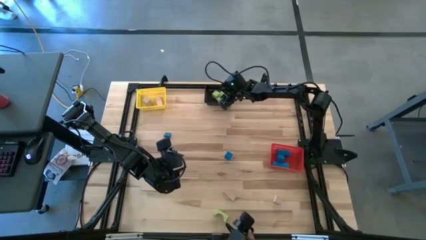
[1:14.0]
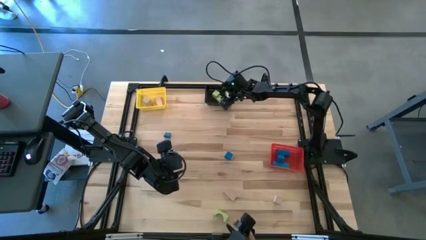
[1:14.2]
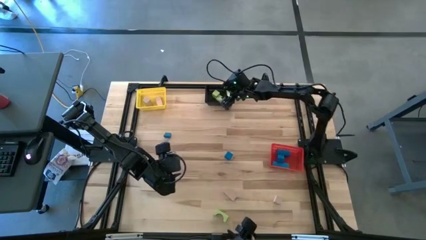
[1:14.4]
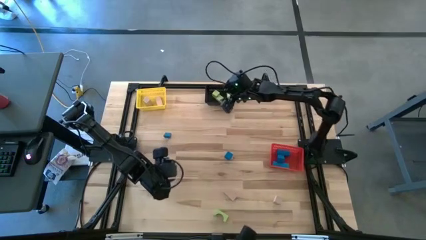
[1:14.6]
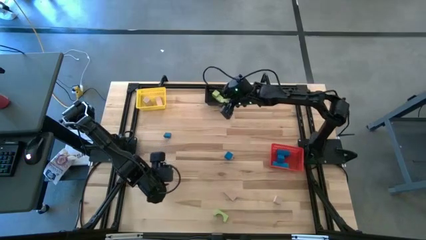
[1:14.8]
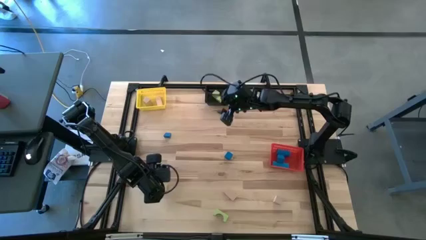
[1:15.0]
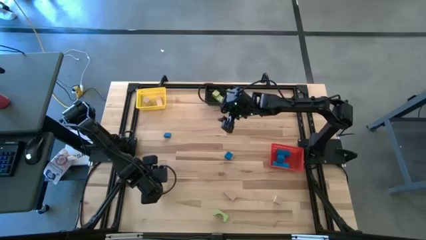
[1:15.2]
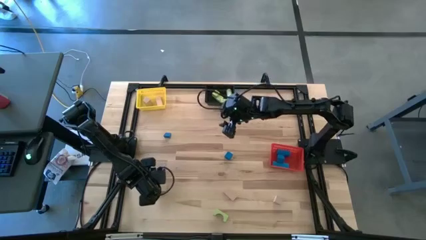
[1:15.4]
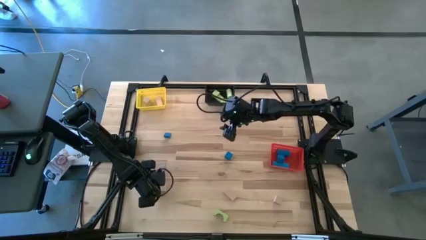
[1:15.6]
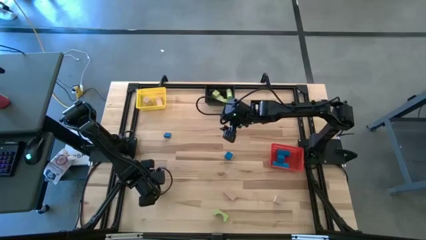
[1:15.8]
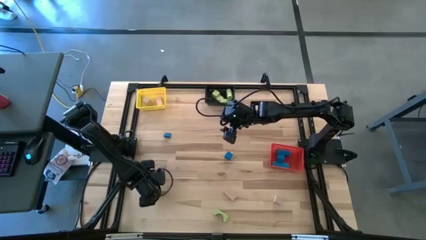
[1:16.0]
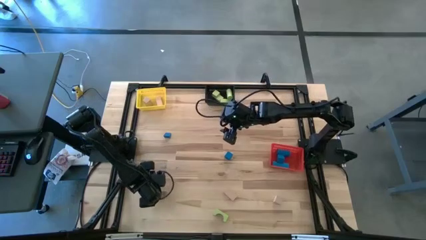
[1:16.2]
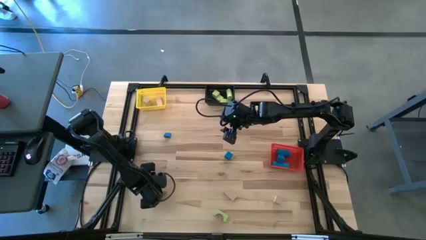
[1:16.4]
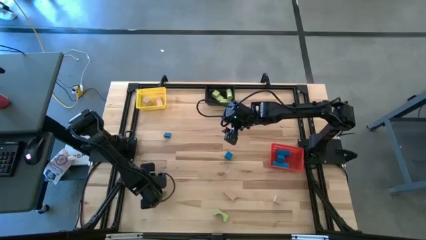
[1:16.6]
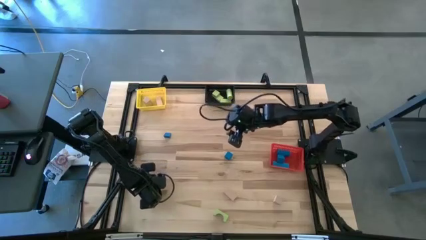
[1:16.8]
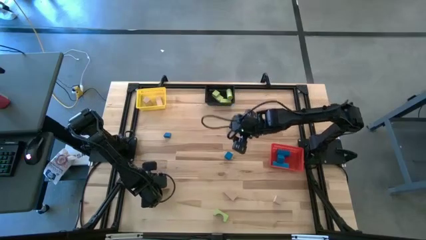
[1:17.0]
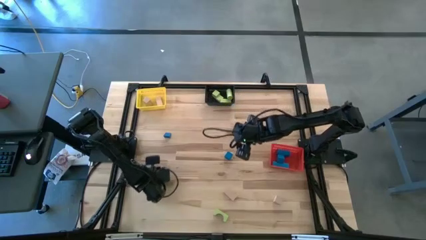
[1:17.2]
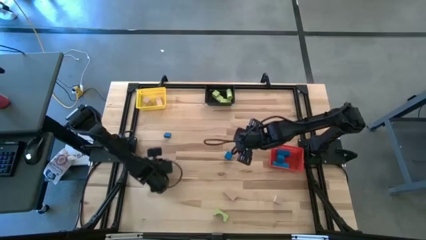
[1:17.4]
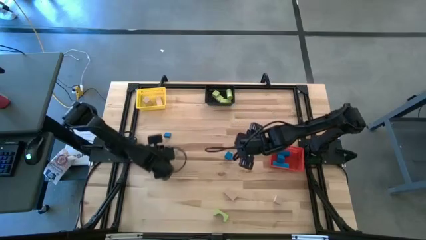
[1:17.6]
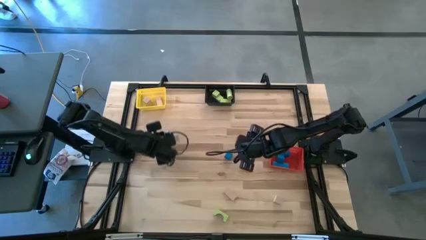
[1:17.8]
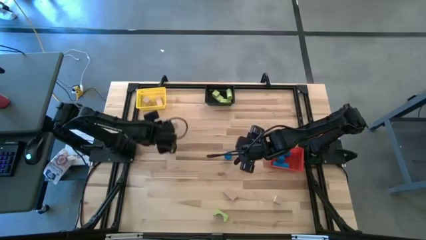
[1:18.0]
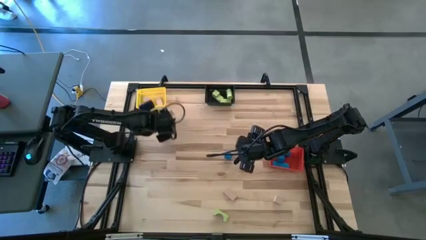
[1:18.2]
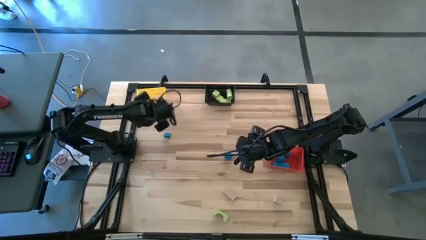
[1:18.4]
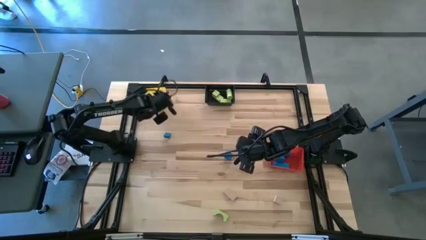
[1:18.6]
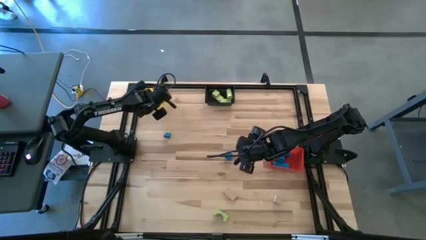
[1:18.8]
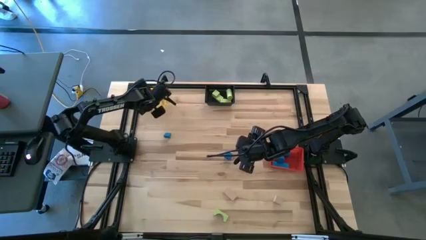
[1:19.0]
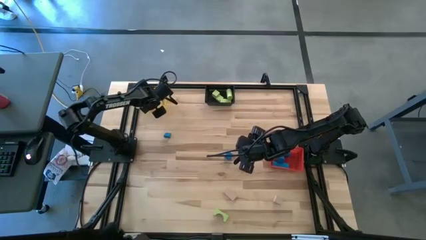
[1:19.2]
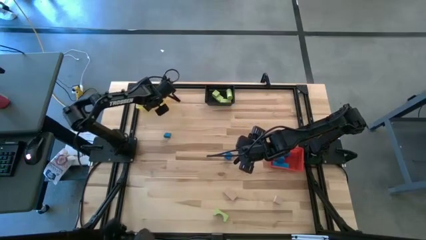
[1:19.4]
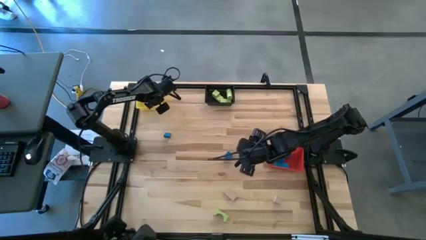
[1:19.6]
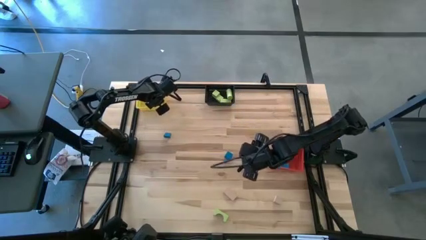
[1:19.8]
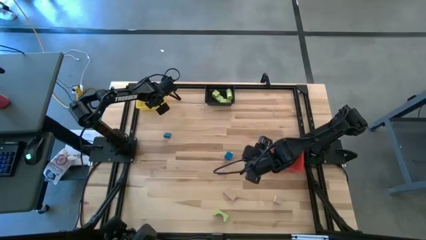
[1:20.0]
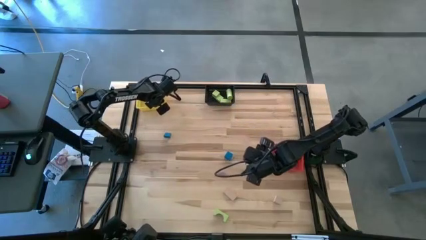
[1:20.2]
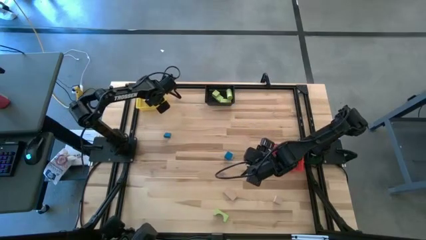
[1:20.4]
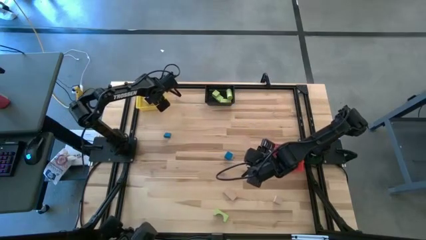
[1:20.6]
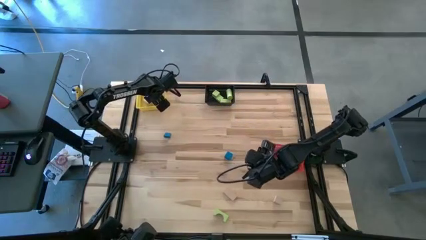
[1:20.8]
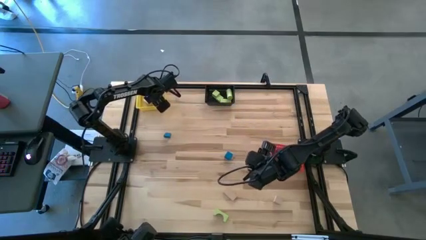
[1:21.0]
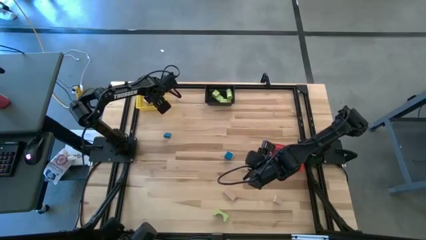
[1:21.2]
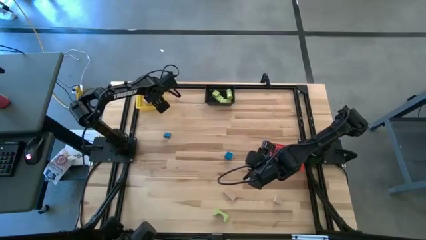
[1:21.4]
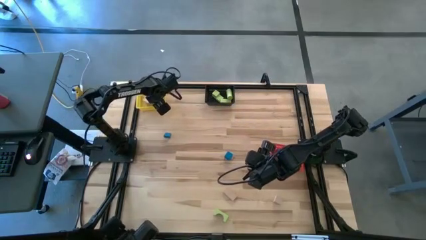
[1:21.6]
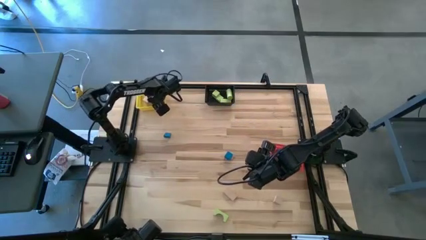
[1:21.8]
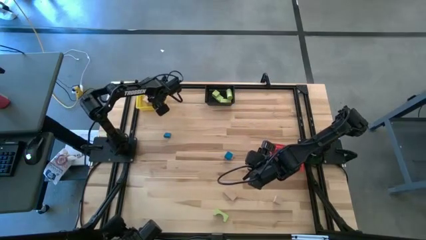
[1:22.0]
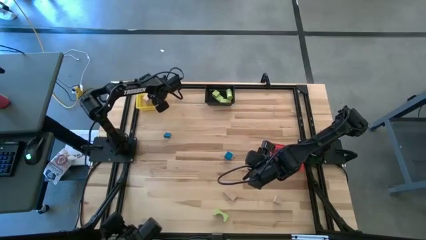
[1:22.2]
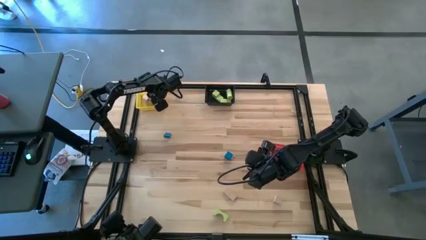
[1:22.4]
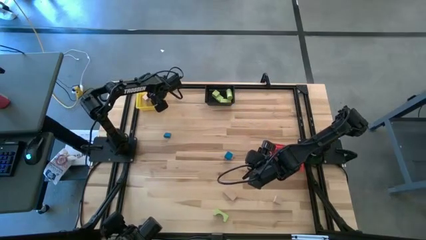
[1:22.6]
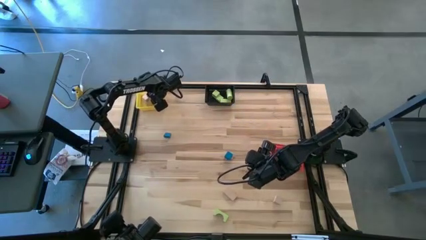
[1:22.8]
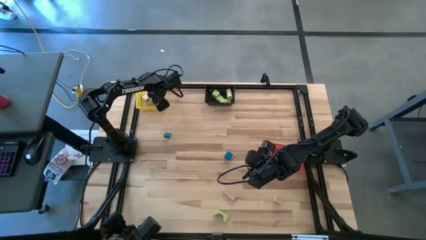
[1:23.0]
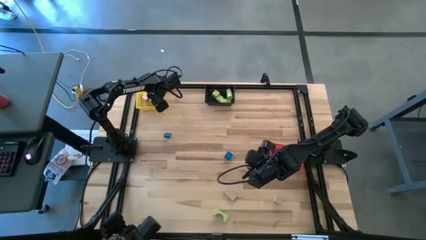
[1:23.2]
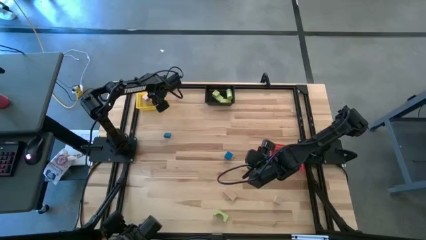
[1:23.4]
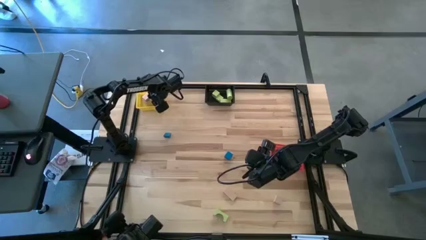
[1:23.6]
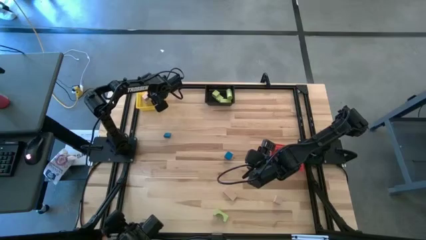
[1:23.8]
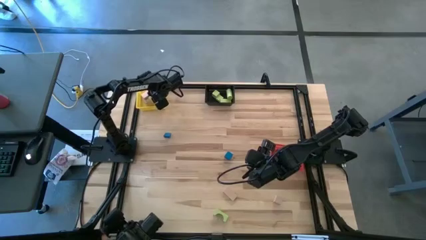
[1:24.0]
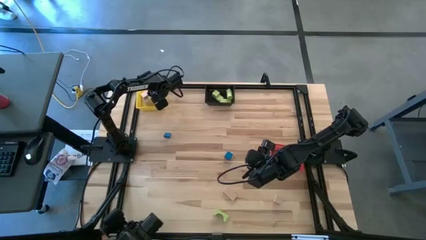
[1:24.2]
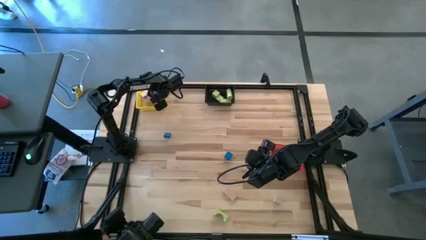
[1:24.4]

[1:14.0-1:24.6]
Task: Sort & place blocks by color
Put the brown block into the yellow basket

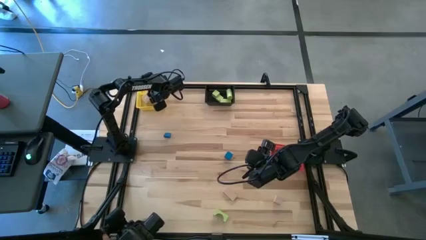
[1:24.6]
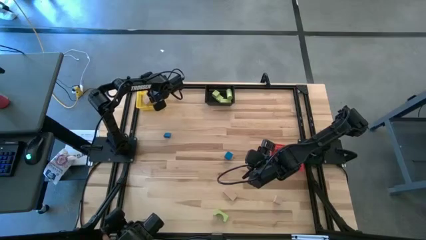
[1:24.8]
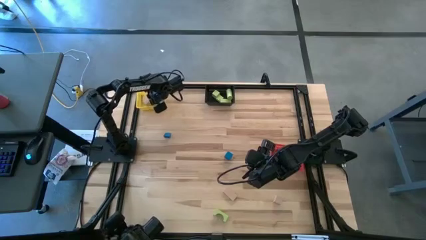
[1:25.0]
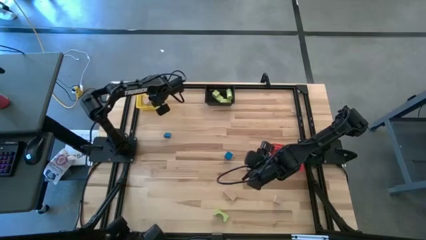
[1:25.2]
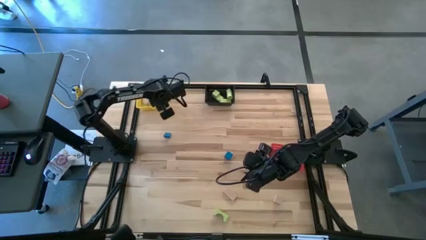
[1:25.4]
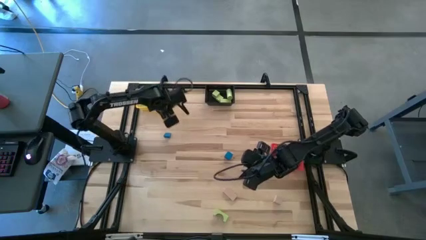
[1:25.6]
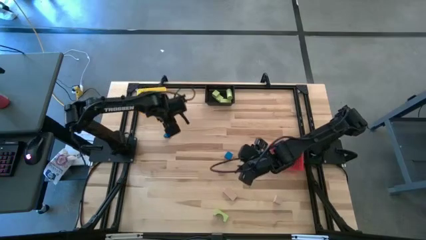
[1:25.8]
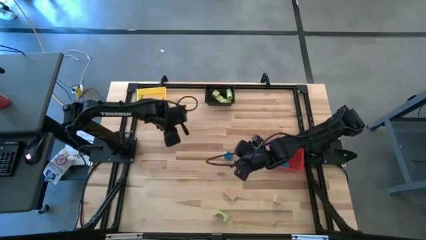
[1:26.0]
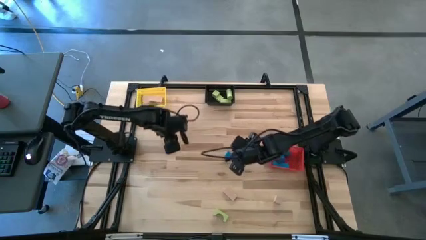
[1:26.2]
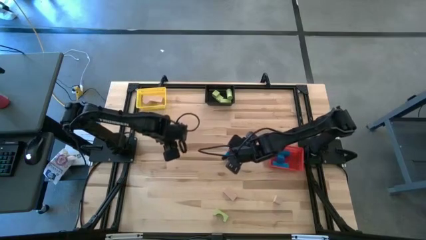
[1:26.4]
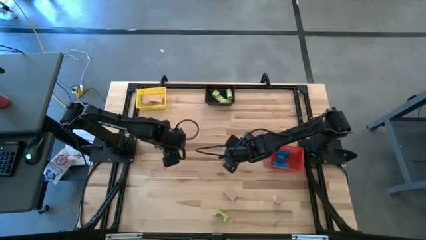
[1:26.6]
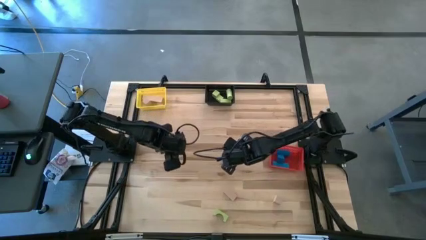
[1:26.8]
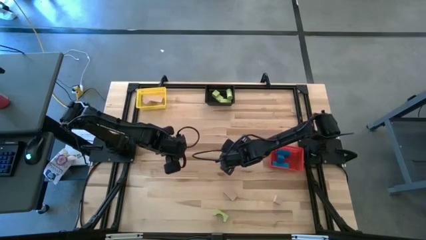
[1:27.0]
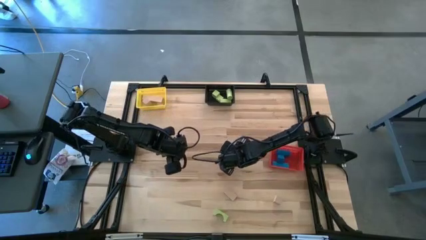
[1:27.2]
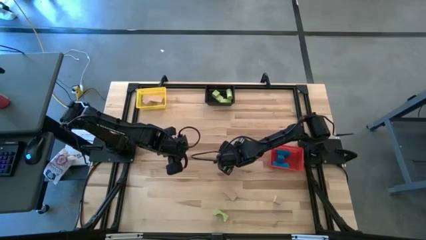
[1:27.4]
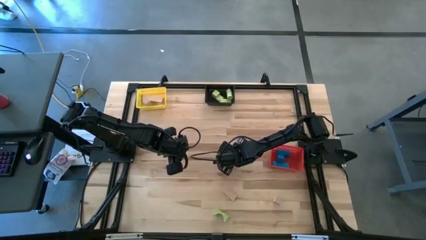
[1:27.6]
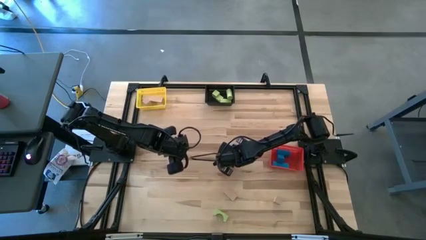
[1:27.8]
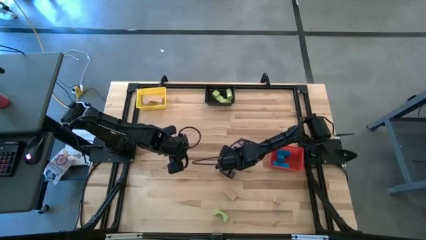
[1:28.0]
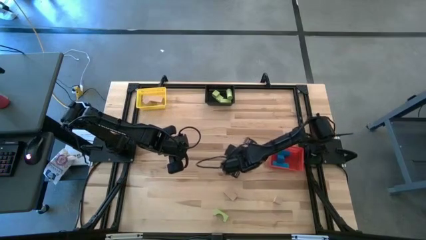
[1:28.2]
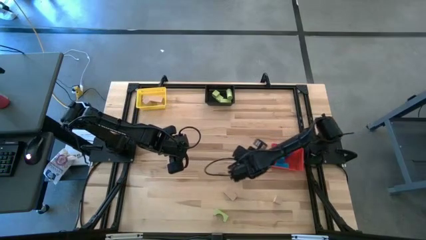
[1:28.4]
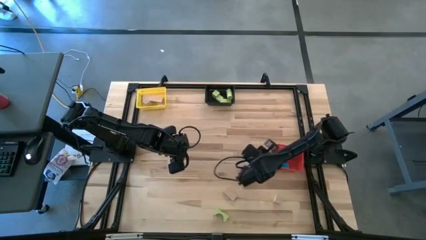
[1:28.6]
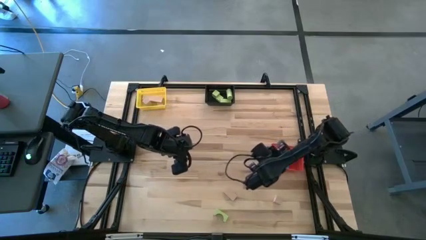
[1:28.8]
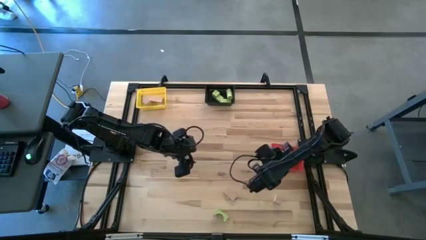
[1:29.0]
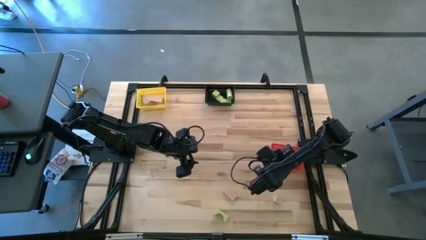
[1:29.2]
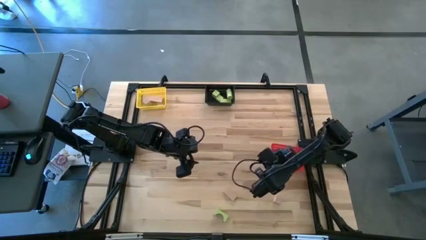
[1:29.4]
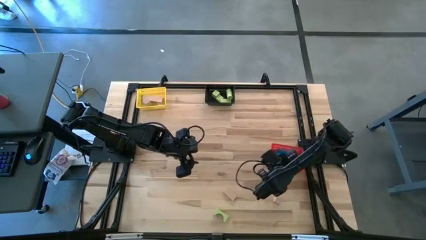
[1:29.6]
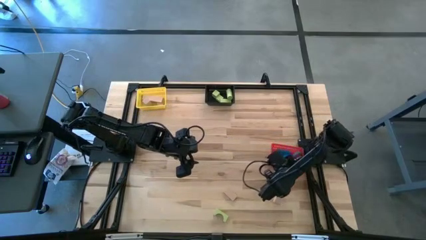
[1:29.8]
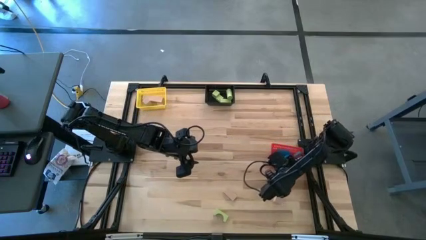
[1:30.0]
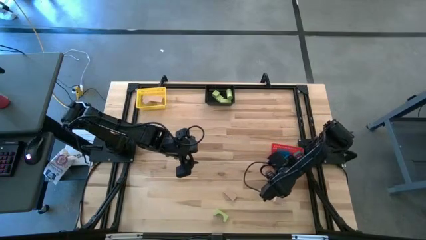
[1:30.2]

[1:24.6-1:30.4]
Put the blue block into the red basket

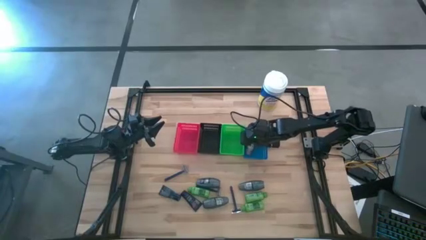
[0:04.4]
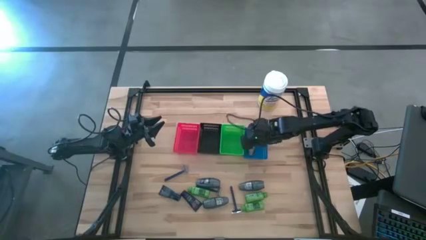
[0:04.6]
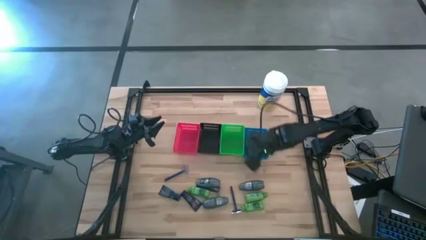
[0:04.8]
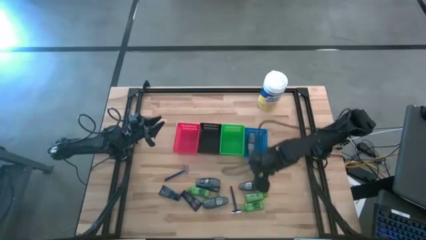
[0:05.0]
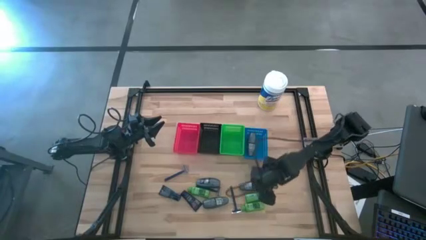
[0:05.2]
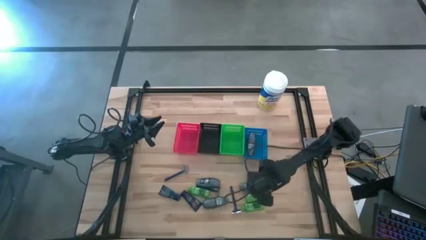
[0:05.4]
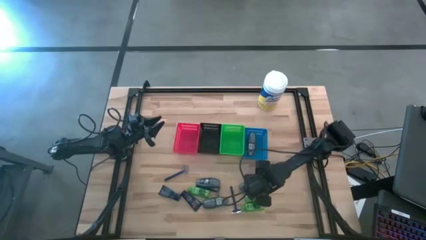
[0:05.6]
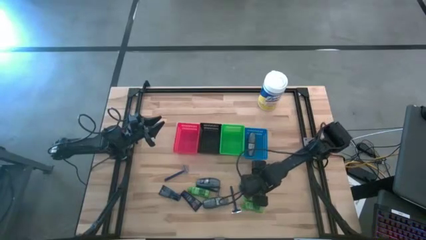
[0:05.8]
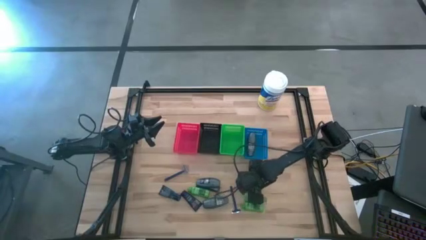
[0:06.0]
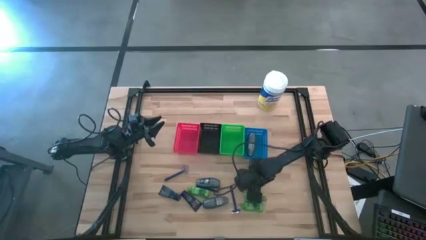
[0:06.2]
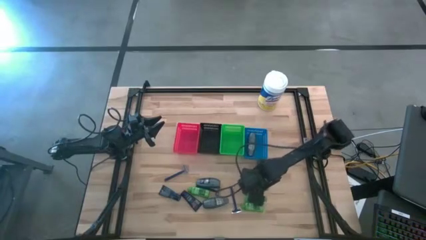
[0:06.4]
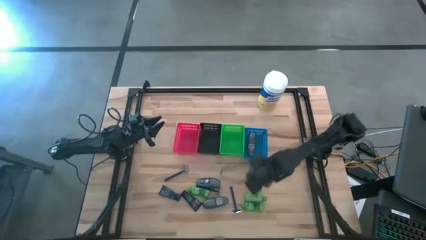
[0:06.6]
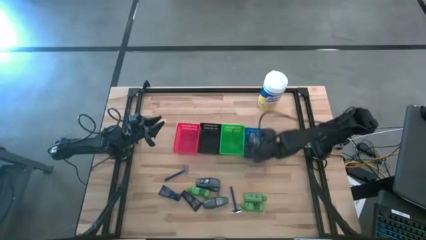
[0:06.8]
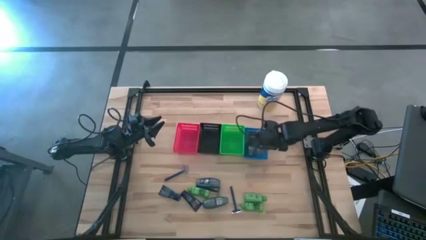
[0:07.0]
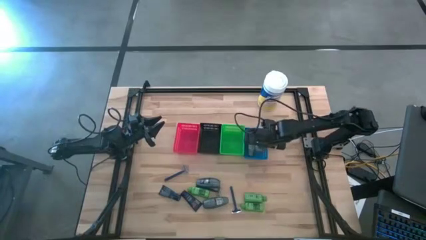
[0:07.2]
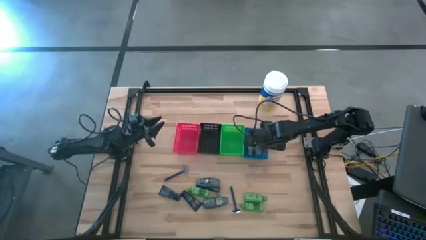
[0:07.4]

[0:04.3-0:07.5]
Task: Pick & Place Travel size toiletries
Put the gray deodorant into the blue bin
